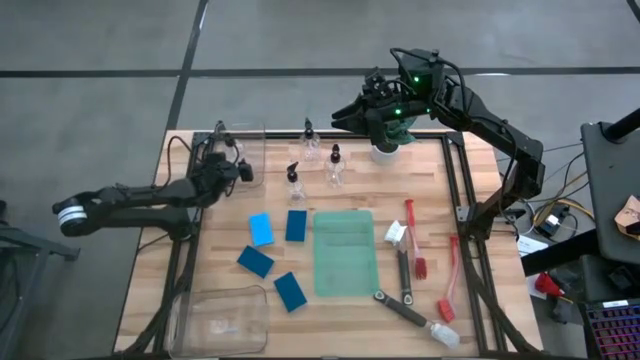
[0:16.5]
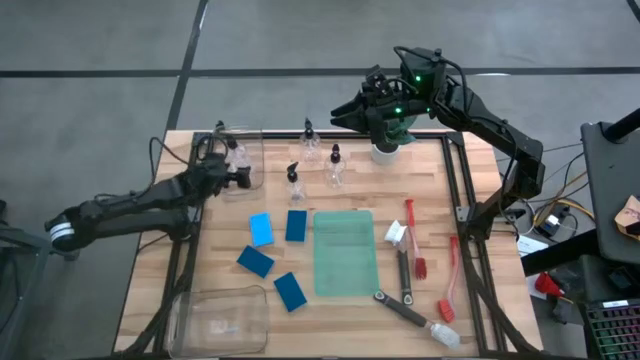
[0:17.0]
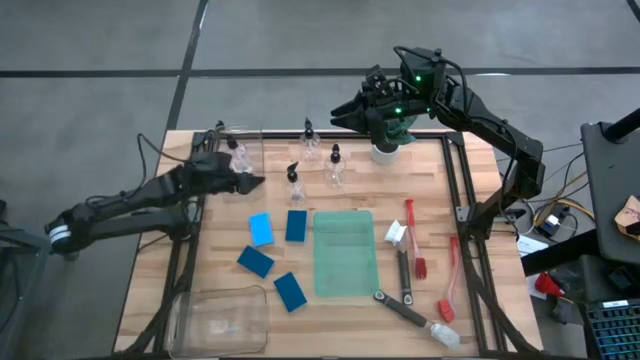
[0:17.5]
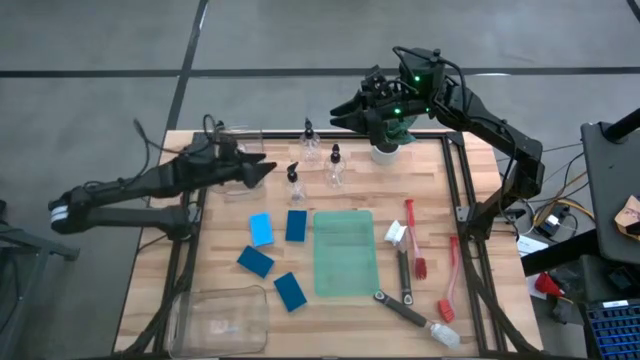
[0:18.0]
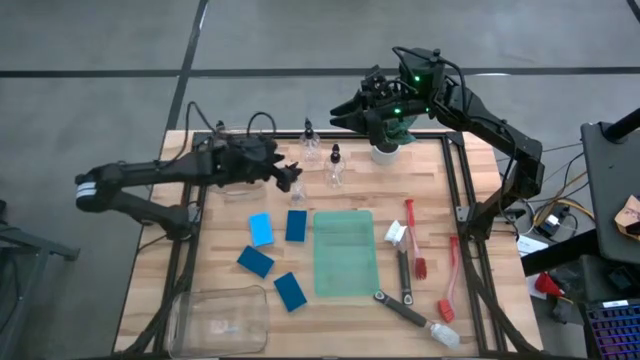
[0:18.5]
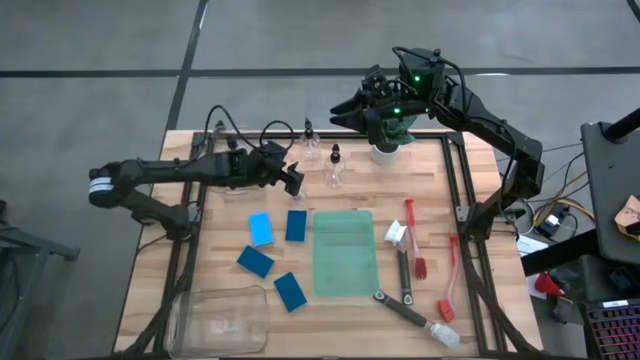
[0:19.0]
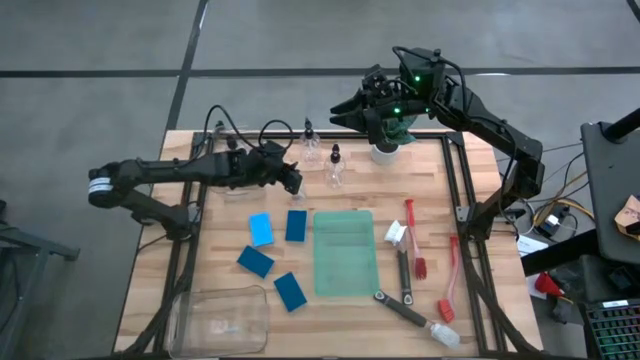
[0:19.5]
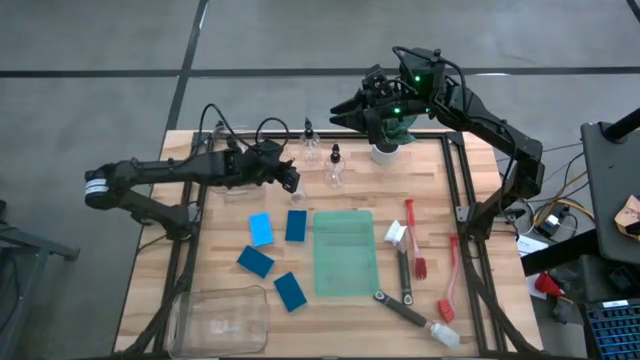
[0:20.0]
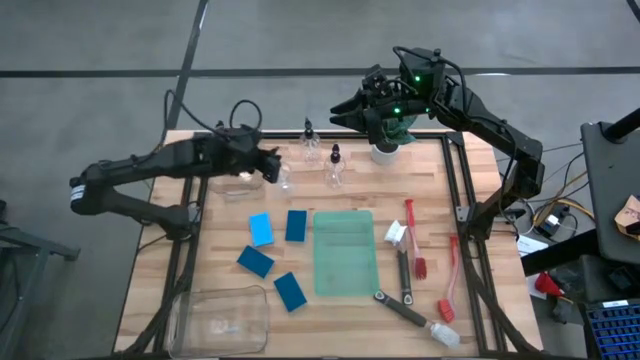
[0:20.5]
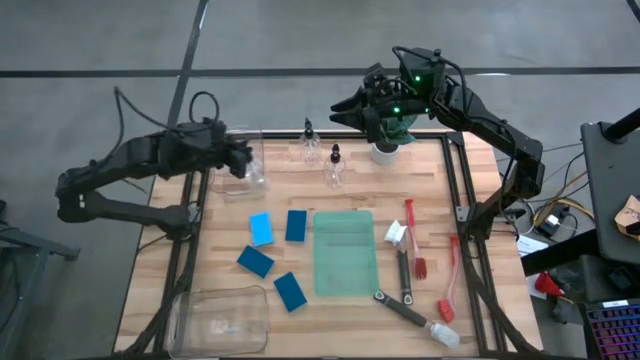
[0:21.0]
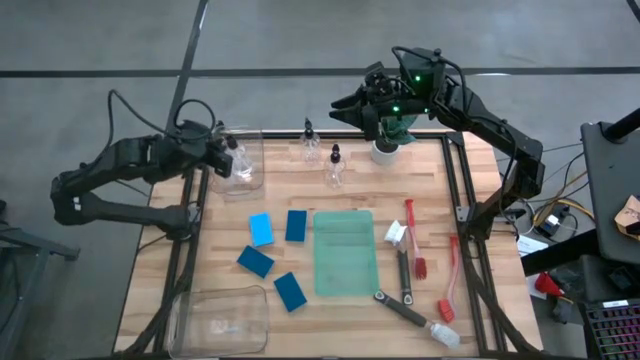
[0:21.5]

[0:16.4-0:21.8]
Task: Pick & Place Kitchen Sink Supplies
Put the transparent soap dispenser into the top transparent bin

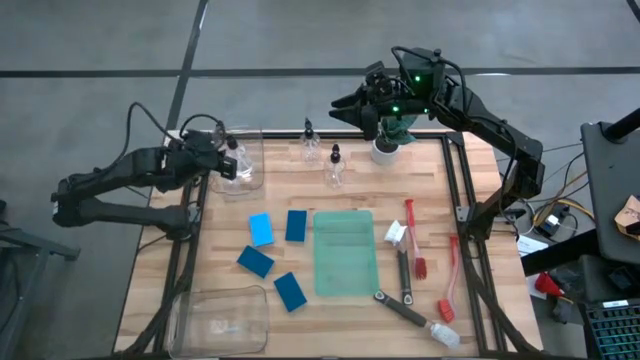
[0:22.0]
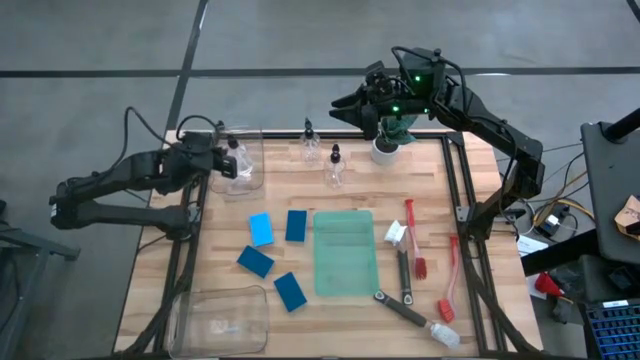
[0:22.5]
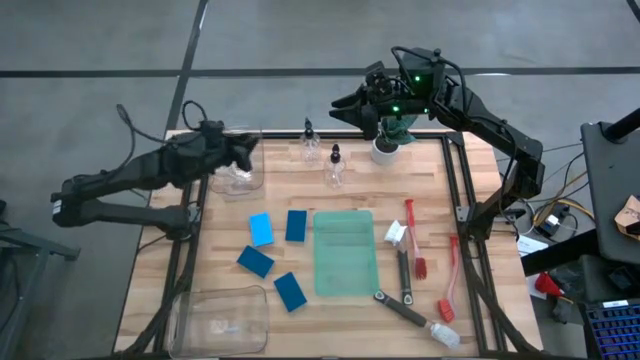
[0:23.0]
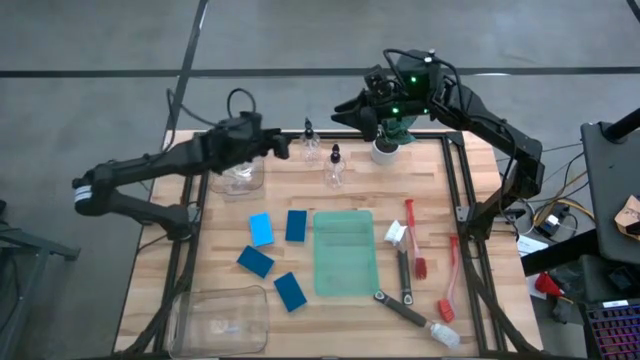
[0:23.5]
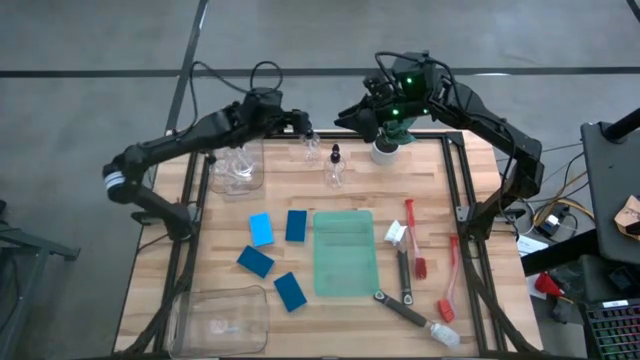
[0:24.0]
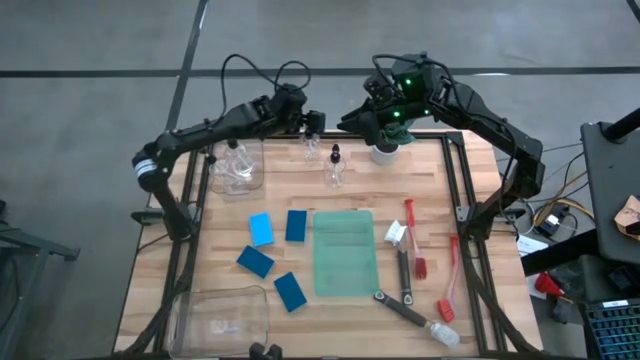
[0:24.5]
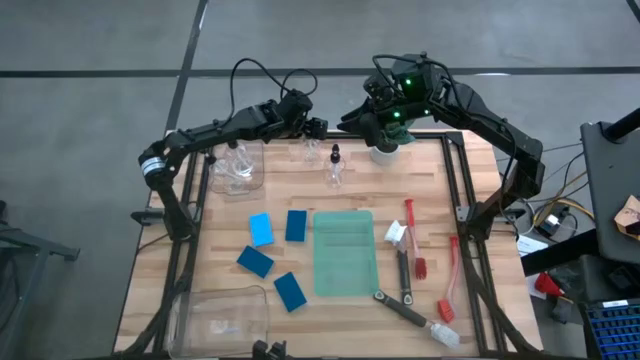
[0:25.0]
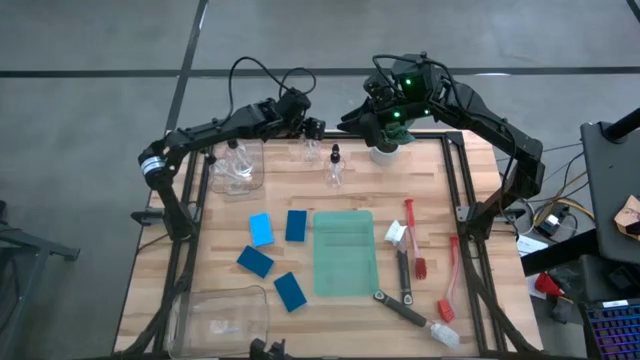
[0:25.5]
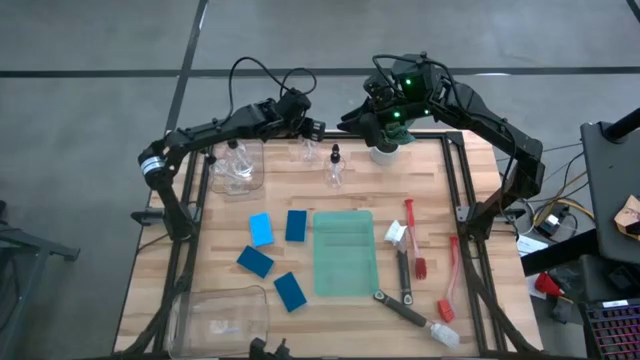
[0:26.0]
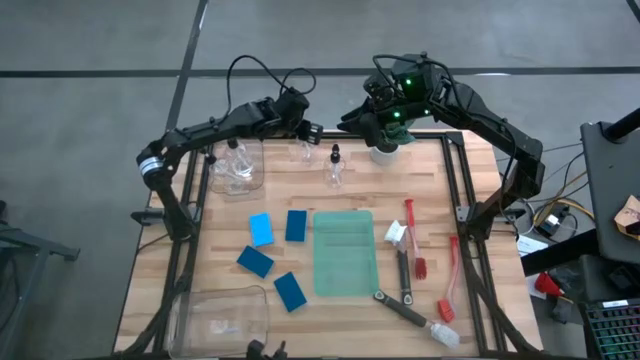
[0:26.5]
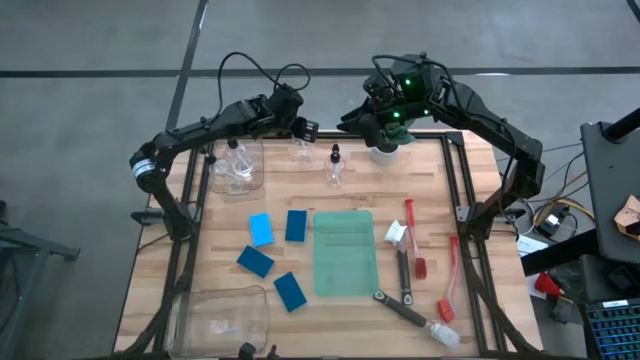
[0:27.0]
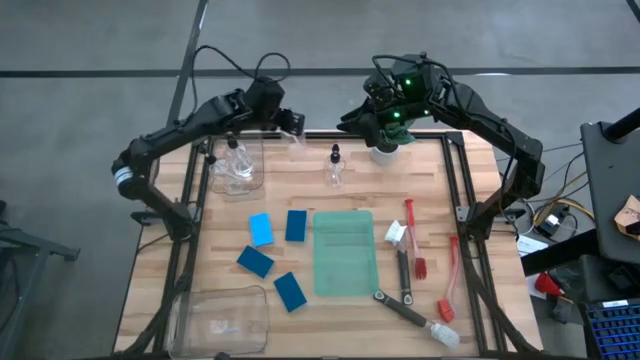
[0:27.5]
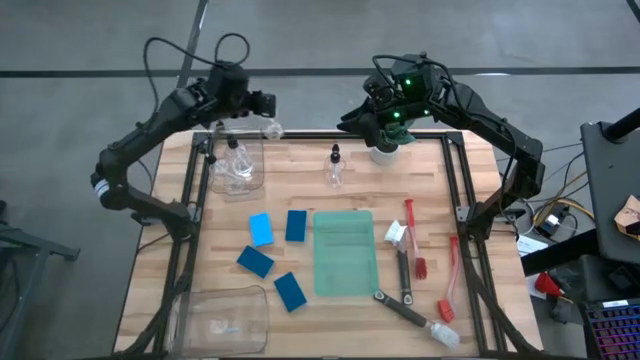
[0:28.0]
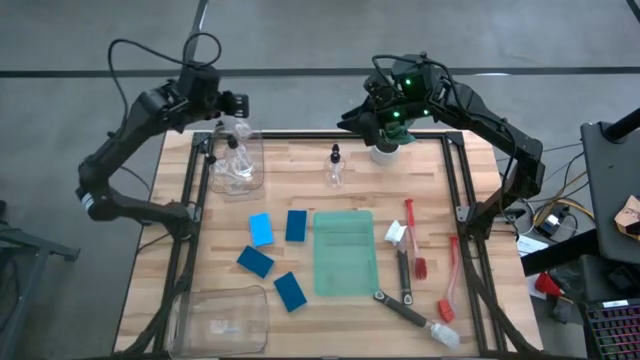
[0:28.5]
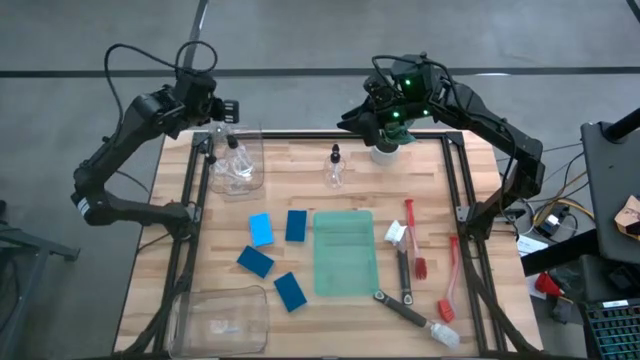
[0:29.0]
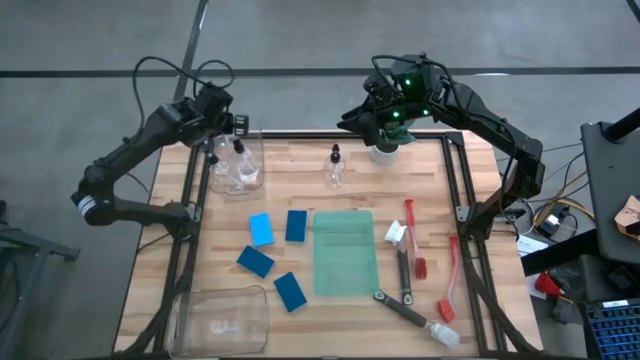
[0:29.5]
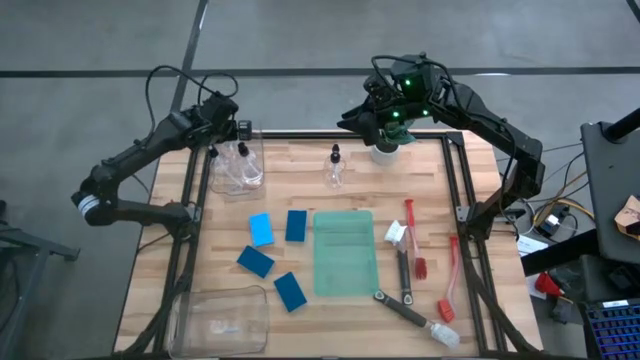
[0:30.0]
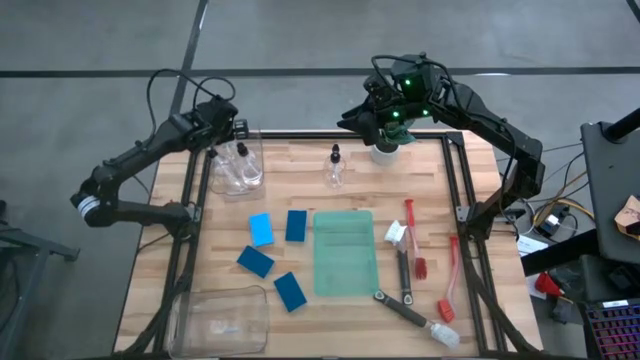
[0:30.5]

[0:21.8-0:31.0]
Put the transparent soap dispenser into the top transparent bin

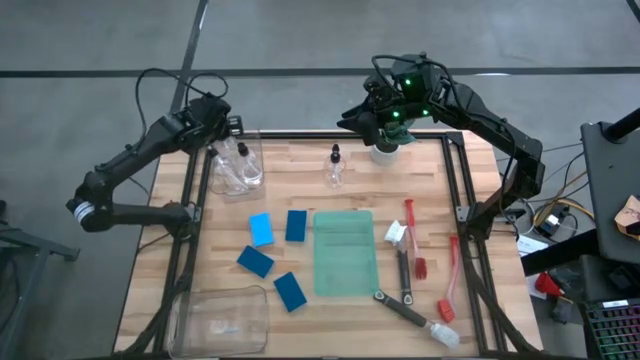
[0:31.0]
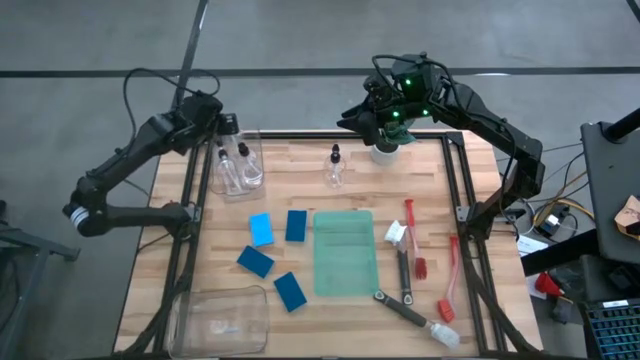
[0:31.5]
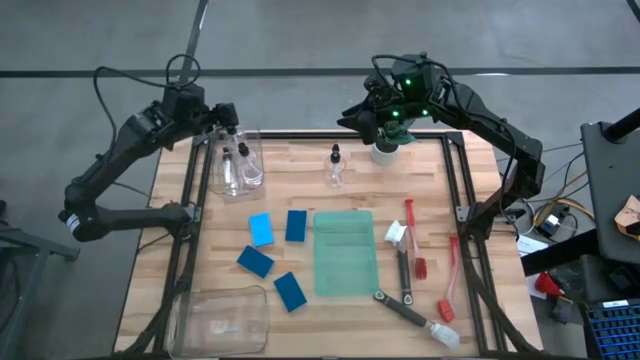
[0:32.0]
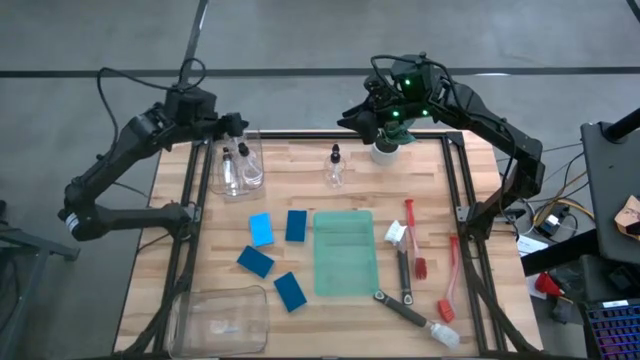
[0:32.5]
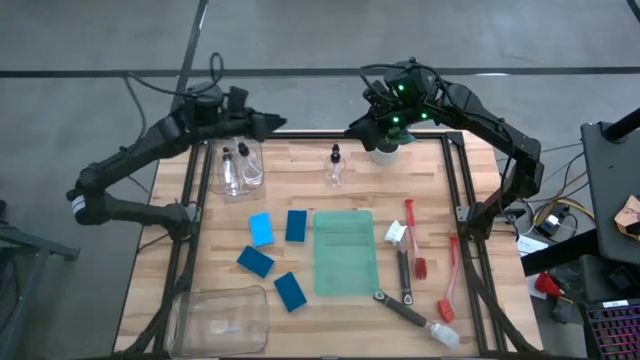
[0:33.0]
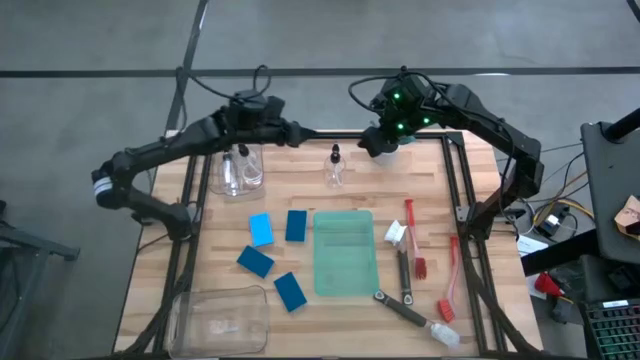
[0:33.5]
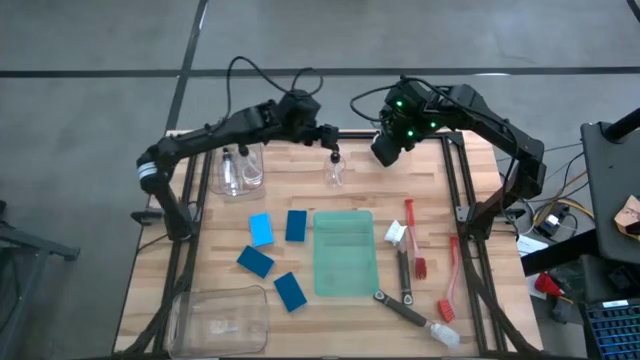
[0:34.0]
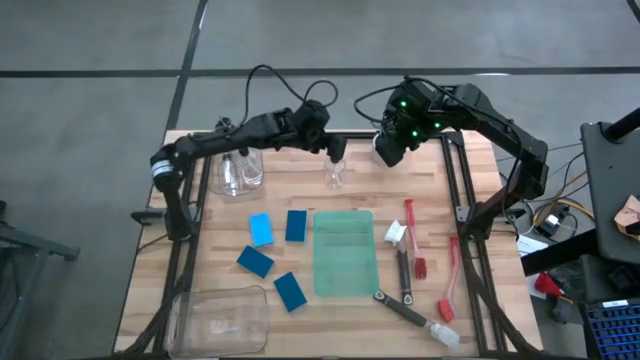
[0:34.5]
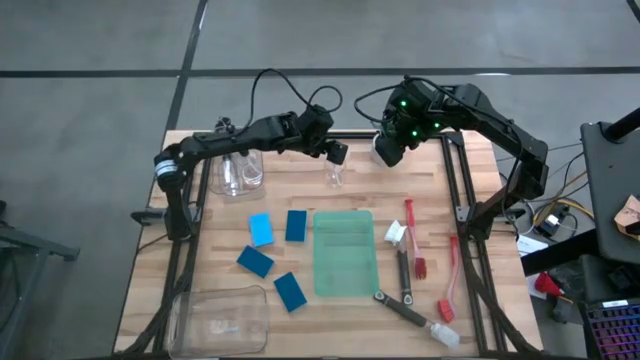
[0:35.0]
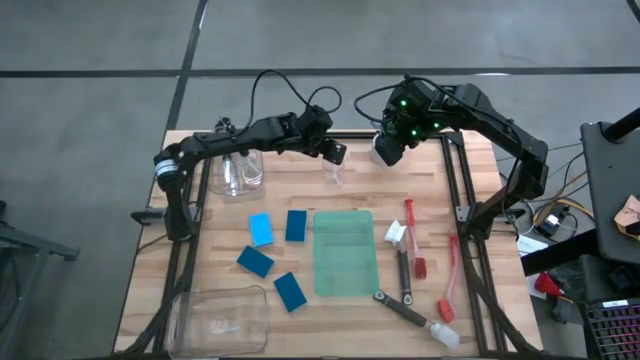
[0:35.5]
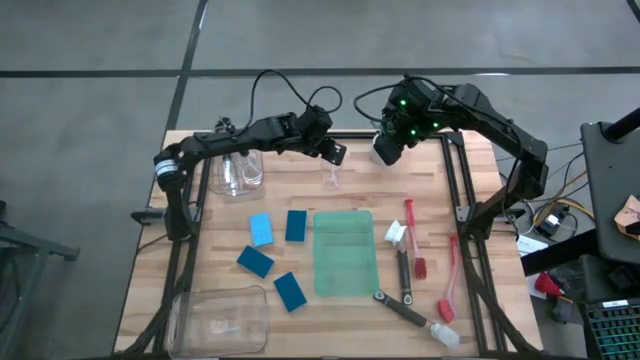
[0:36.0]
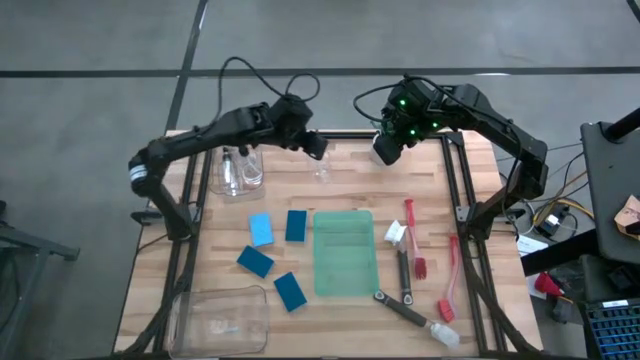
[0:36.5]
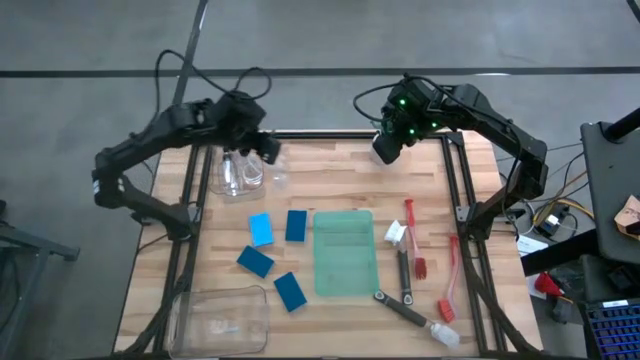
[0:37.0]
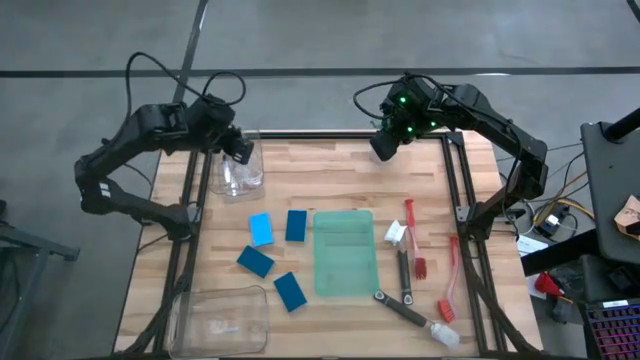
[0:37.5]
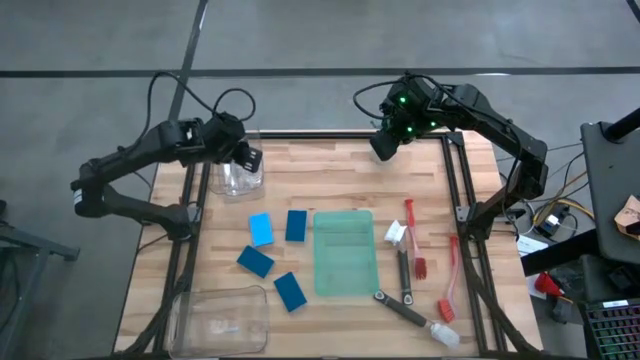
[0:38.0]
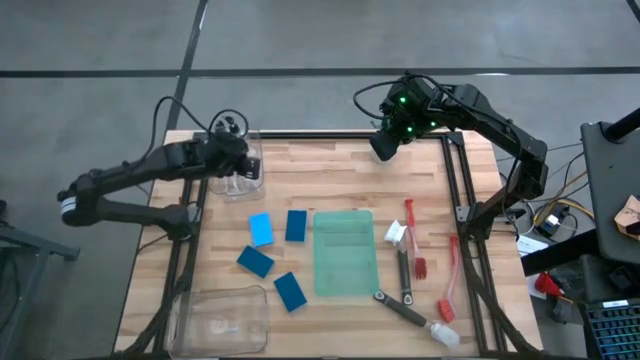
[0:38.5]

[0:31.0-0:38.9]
Put the transparent soap dispenser into the top transparent bin
